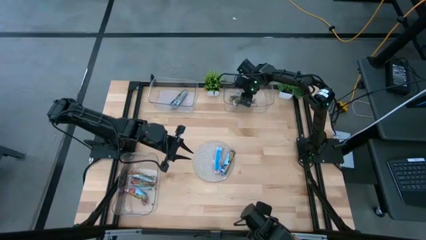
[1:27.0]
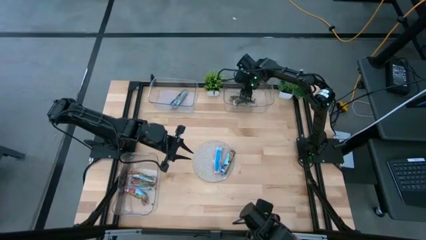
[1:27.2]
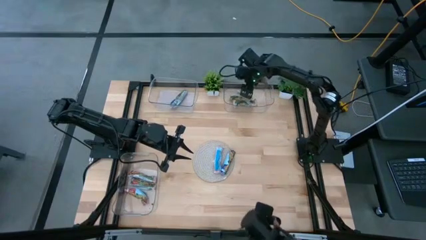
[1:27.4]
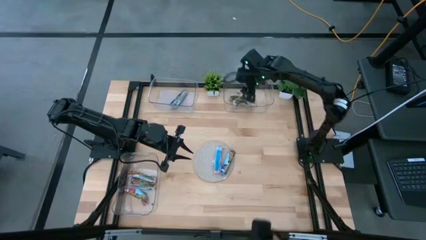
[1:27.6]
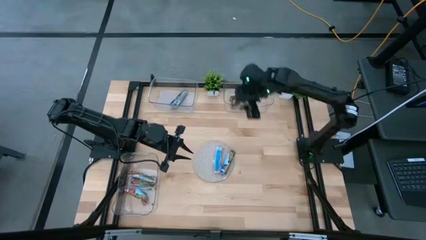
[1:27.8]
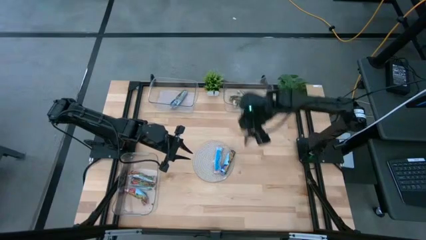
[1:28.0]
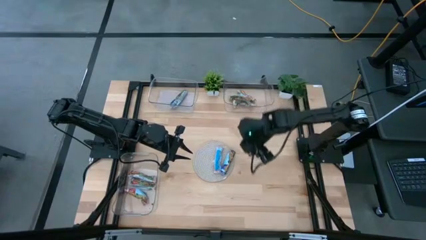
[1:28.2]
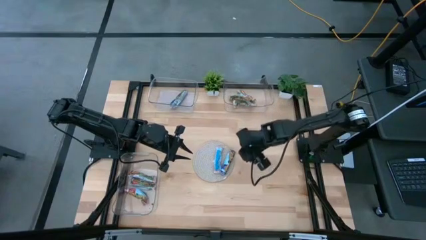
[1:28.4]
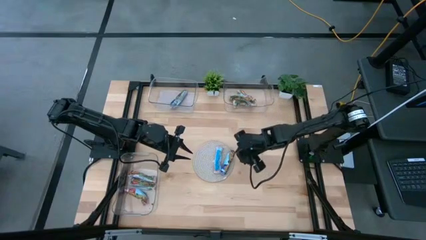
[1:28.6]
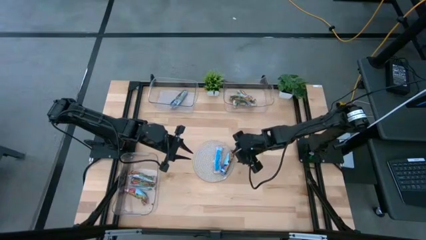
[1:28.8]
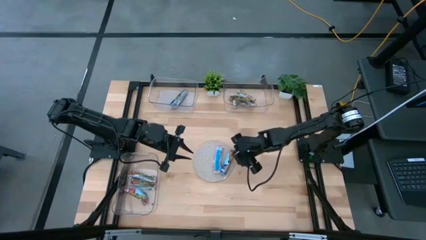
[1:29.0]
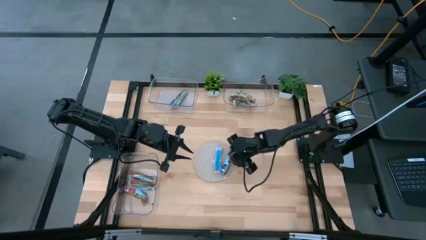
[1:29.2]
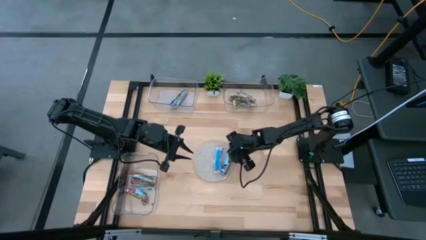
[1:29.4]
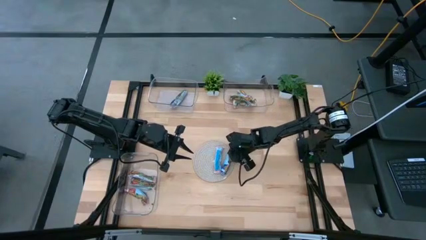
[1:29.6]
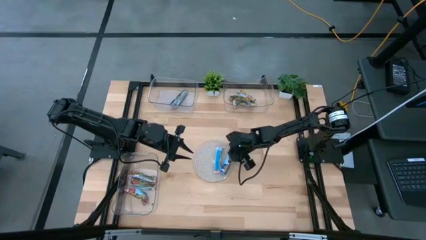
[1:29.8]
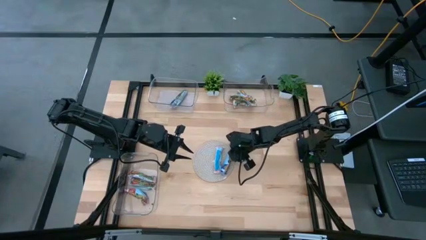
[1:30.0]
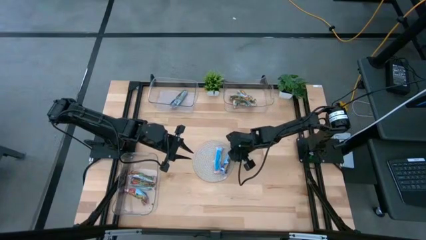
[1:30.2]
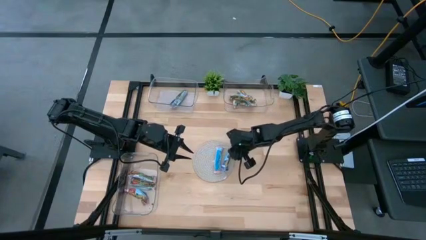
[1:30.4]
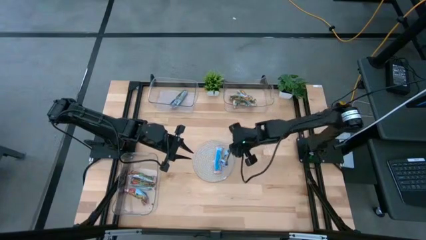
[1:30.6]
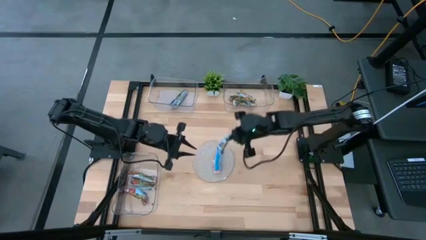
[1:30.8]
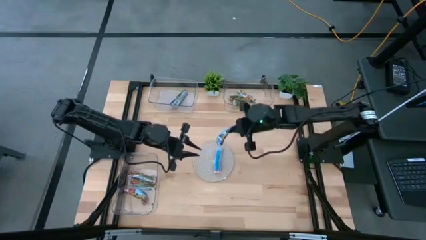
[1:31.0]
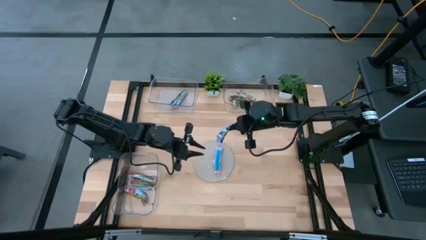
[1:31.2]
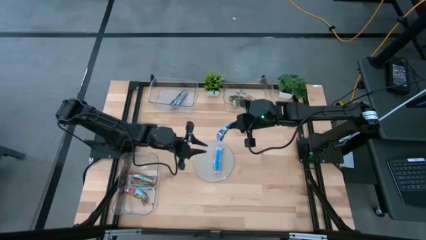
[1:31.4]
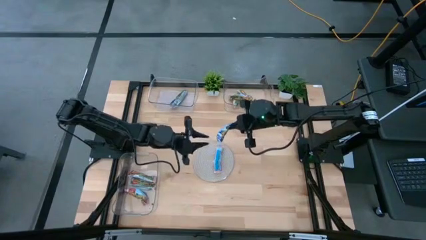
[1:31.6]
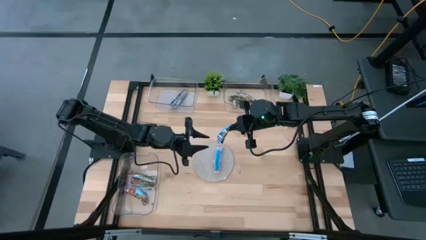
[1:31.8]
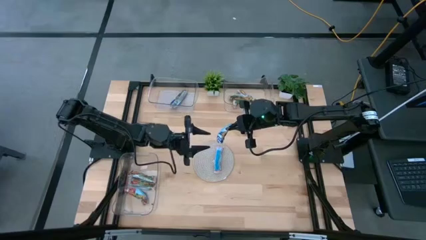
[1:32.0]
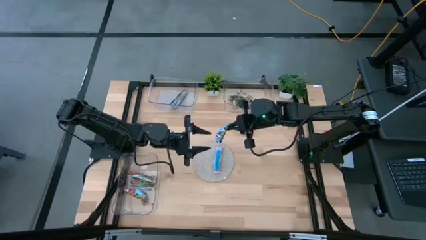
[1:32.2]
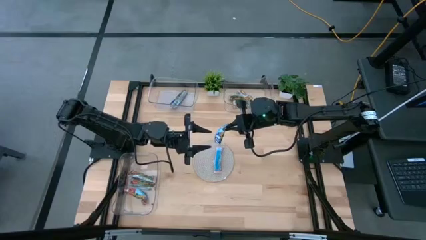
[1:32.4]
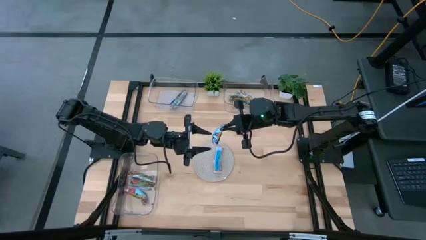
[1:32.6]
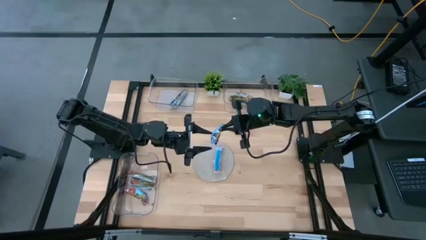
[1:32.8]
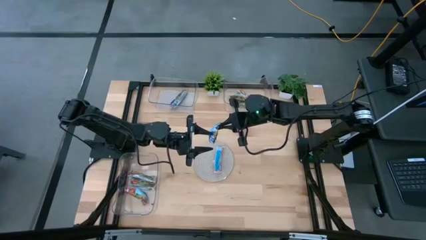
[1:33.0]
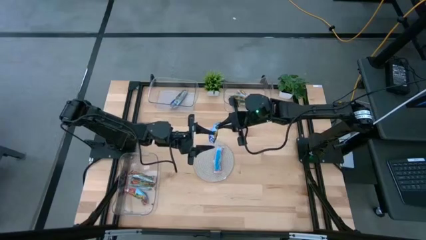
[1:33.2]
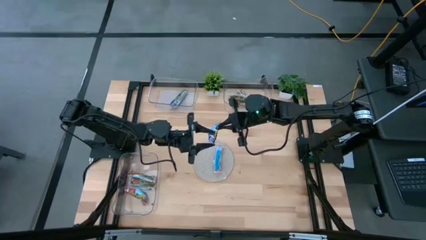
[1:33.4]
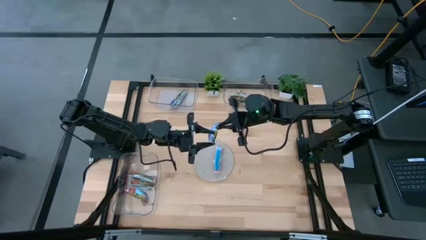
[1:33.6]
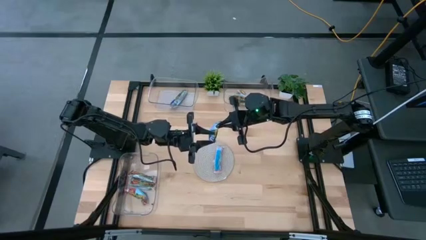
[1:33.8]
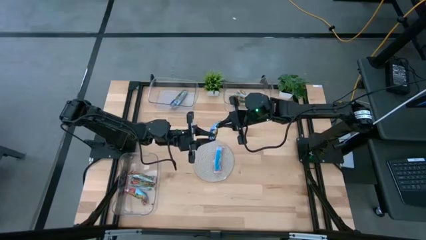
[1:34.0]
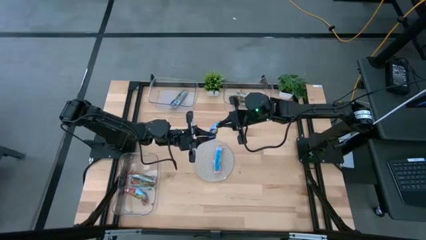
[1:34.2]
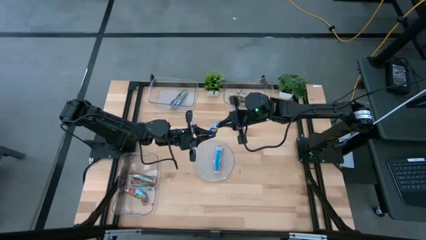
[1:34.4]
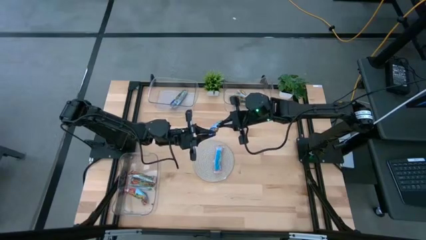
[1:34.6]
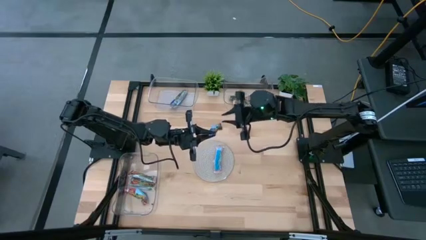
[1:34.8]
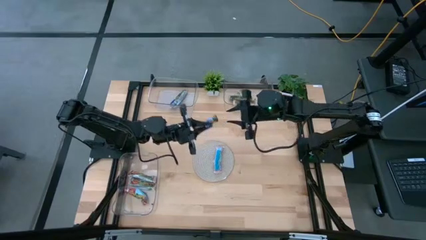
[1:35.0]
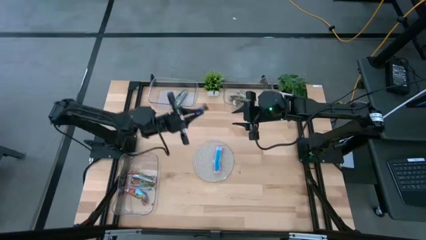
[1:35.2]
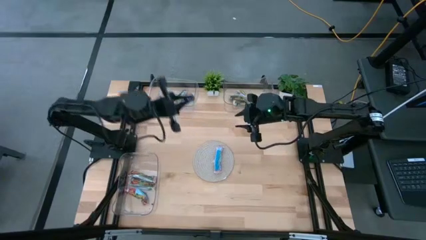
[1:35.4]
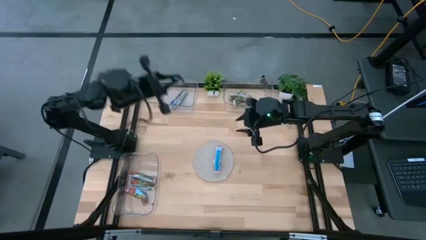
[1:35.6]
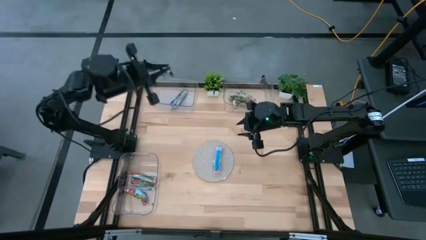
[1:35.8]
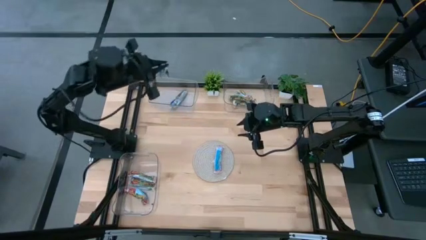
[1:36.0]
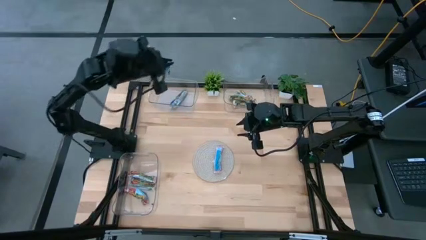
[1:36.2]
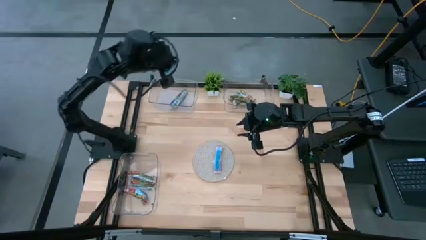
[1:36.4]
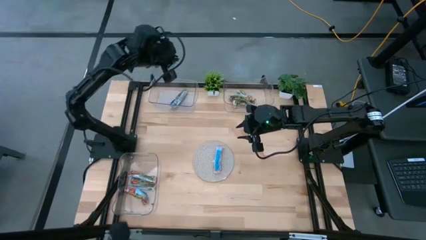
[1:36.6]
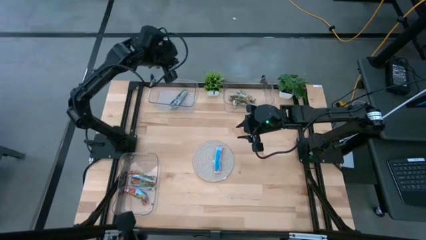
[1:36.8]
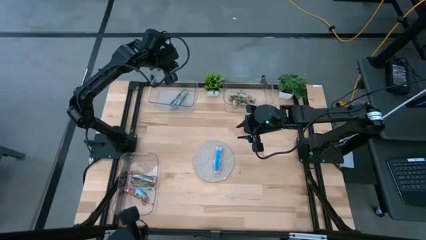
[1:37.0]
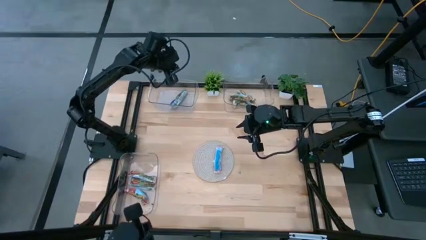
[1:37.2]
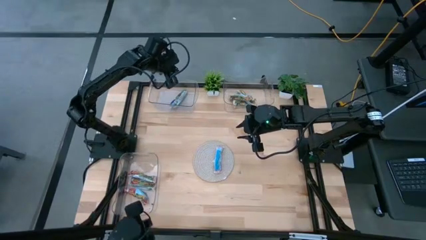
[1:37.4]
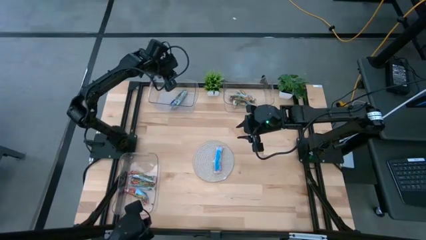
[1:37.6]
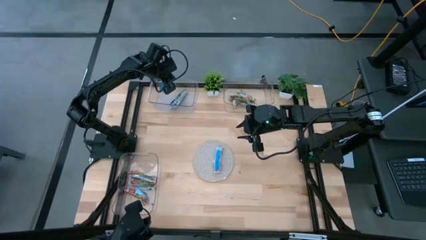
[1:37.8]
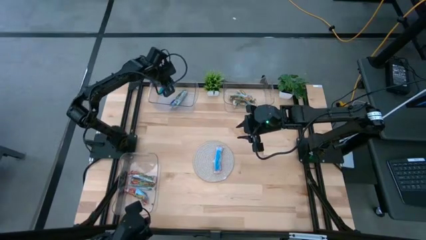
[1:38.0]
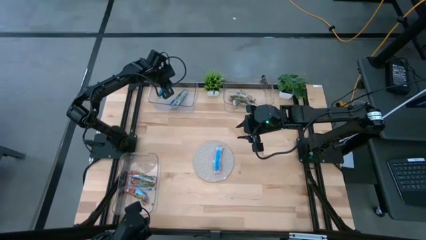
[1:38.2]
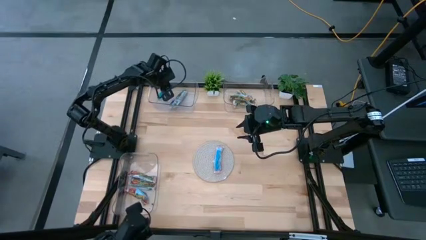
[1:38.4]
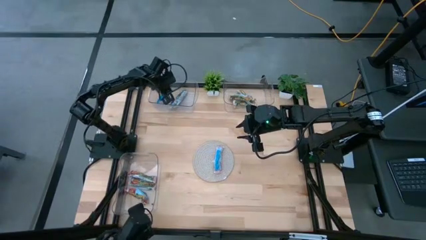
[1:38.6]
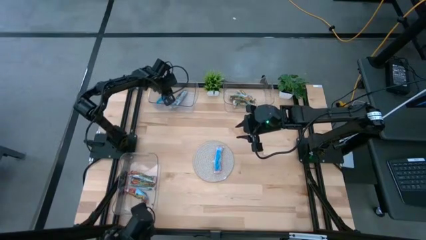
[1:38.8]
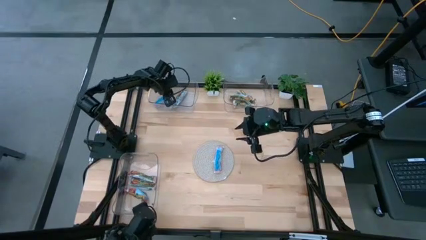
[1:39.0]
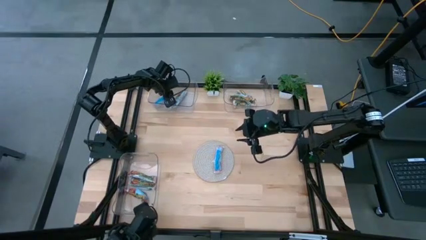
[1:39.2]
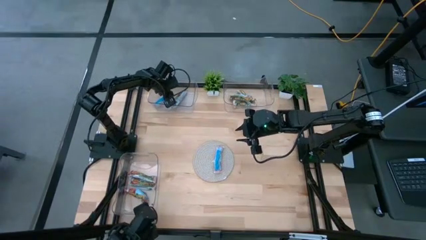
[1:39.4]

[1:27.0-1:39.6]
Task: Pick and place Granola Bars by type
Put the blue granola bar into the top left transparent bin
